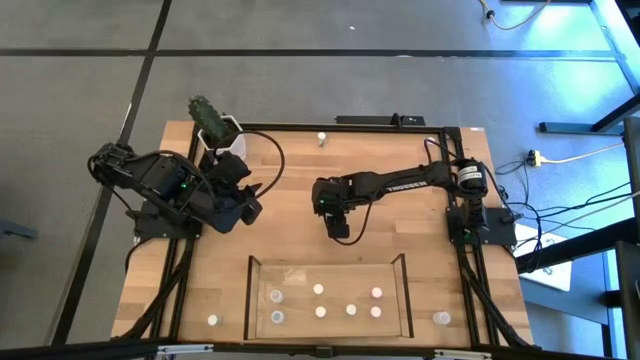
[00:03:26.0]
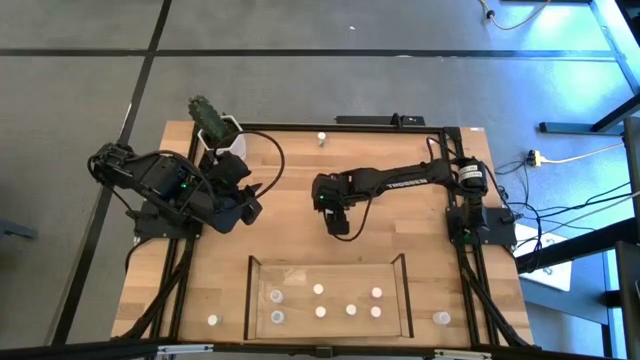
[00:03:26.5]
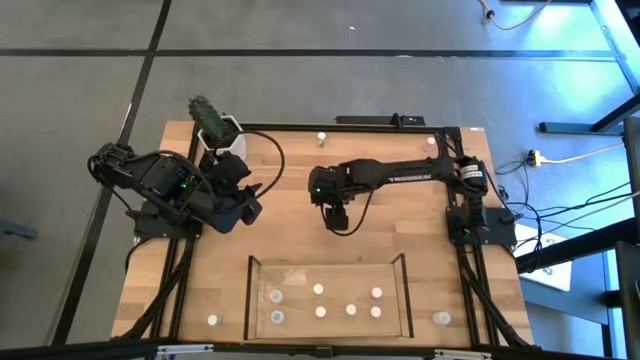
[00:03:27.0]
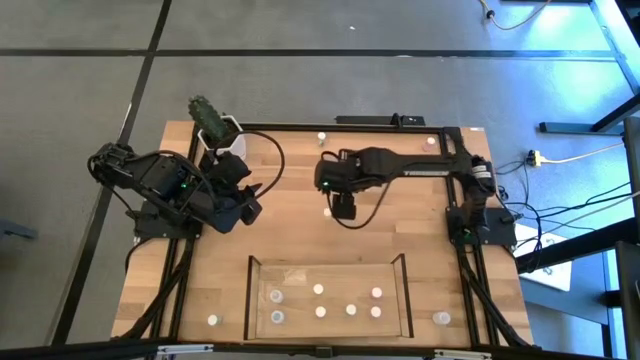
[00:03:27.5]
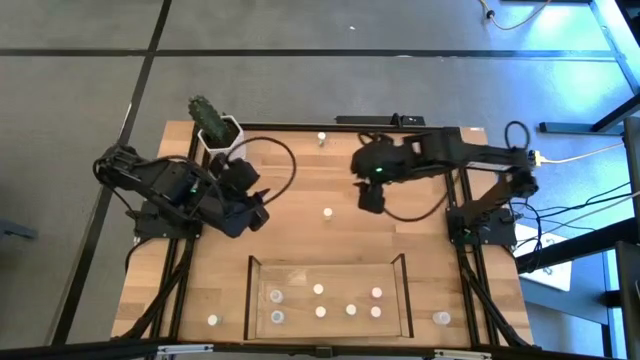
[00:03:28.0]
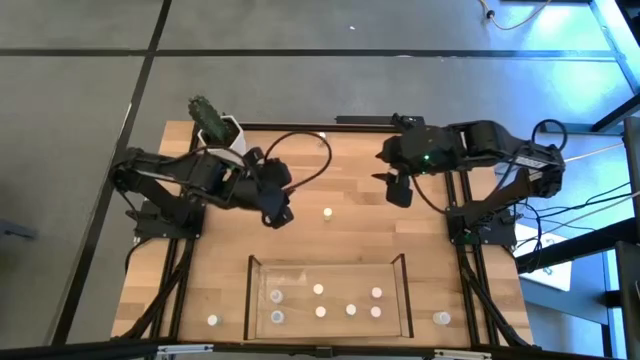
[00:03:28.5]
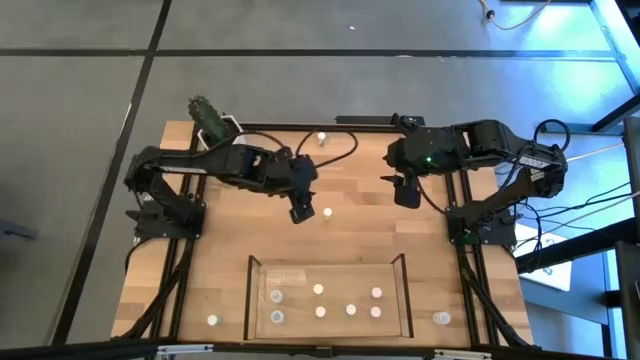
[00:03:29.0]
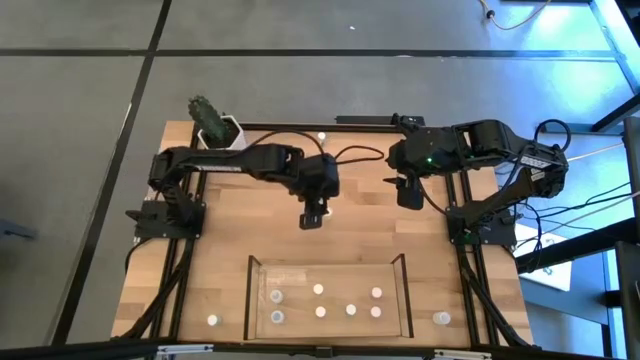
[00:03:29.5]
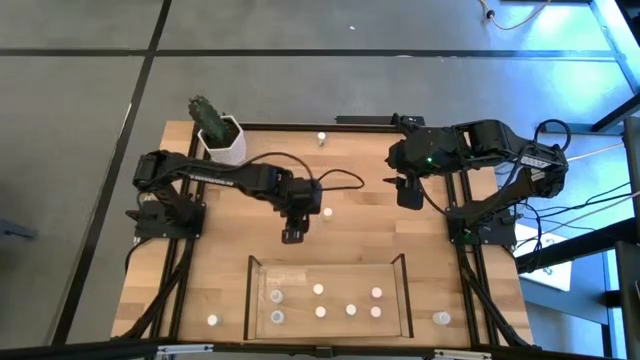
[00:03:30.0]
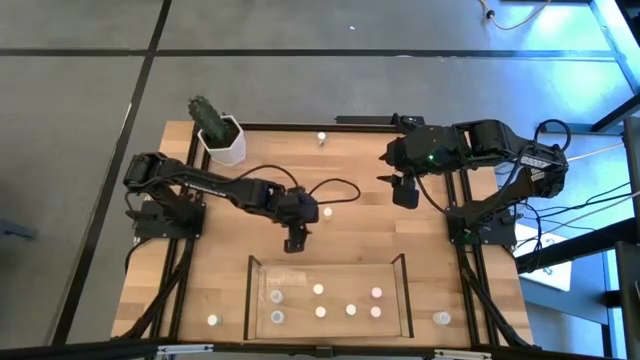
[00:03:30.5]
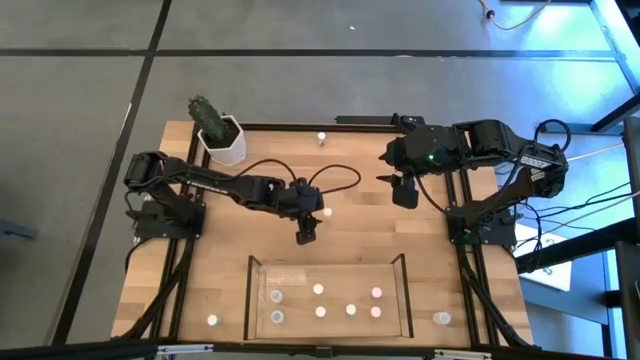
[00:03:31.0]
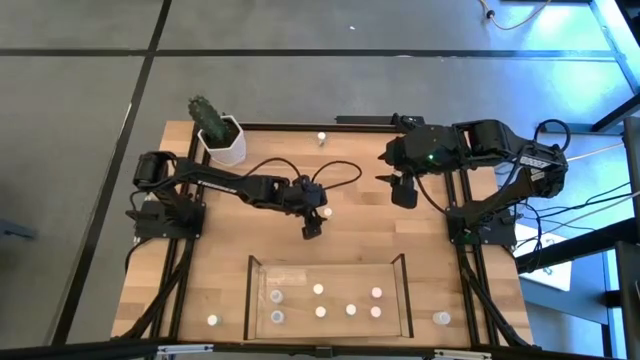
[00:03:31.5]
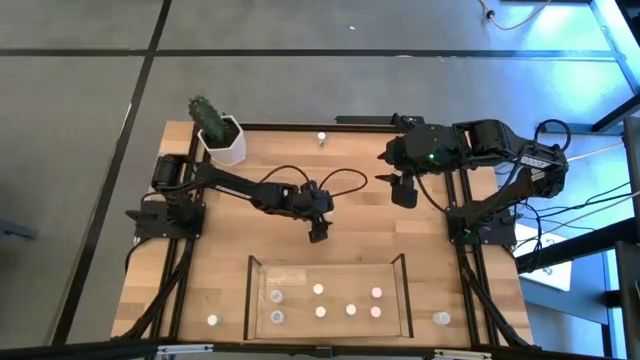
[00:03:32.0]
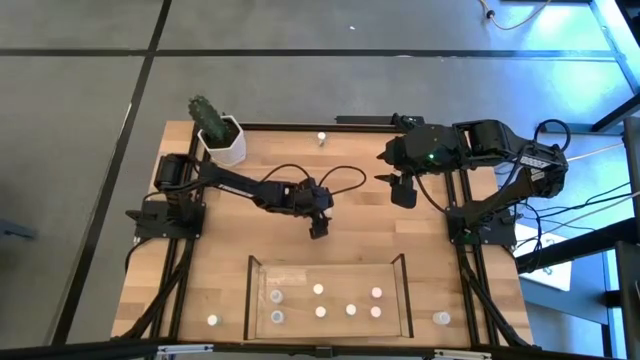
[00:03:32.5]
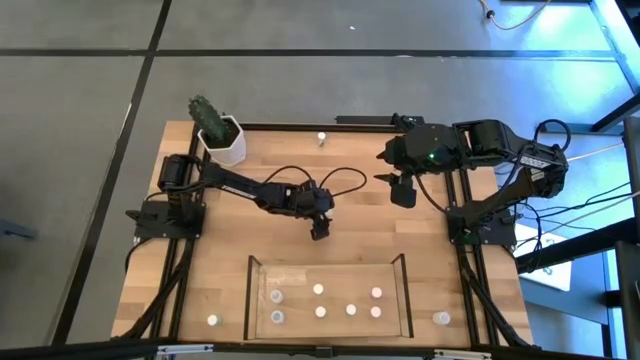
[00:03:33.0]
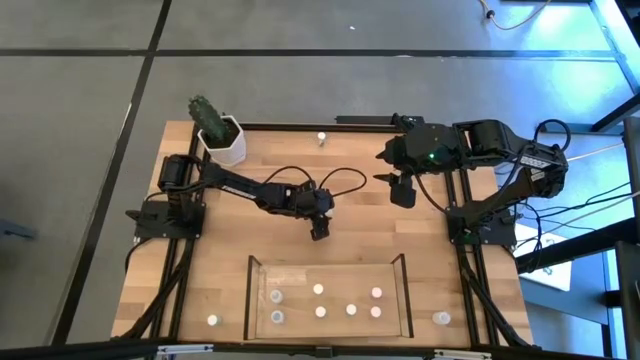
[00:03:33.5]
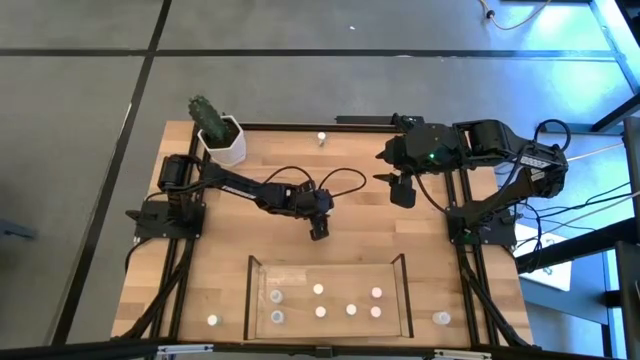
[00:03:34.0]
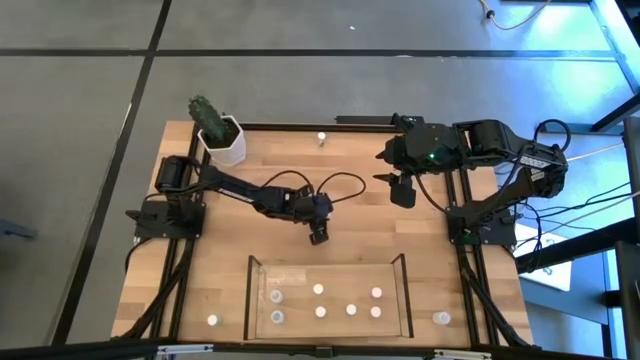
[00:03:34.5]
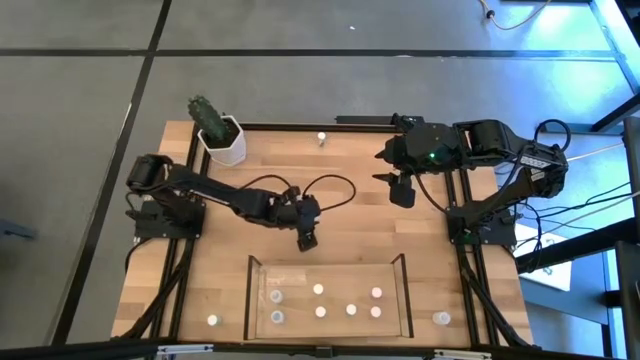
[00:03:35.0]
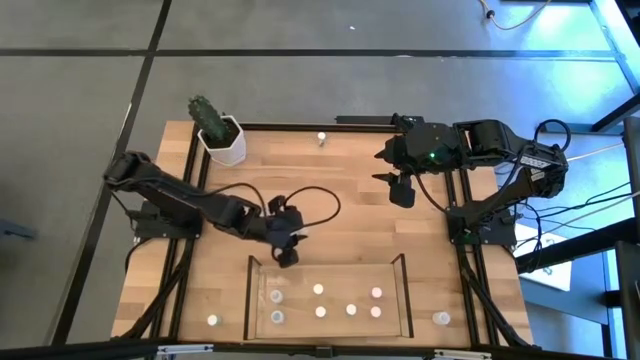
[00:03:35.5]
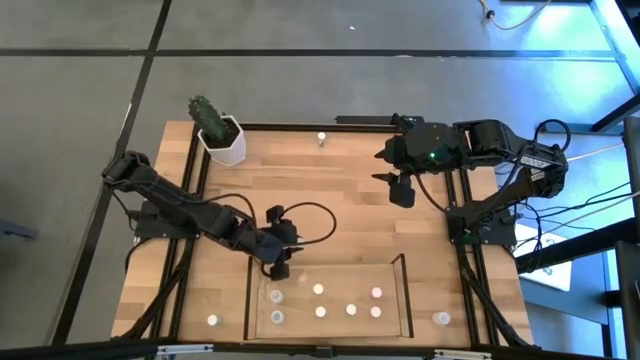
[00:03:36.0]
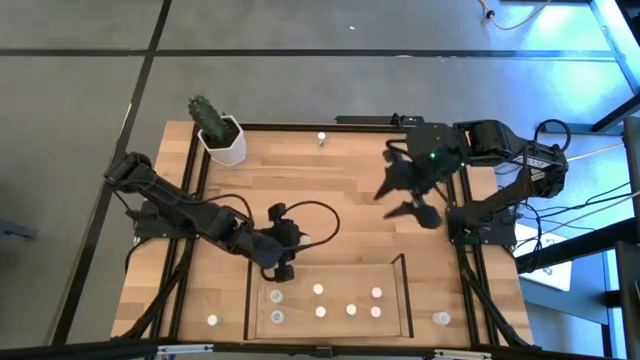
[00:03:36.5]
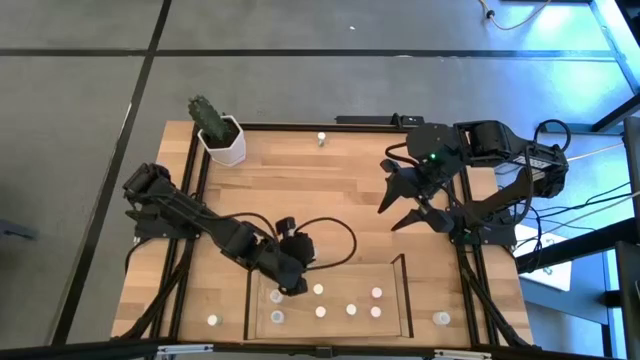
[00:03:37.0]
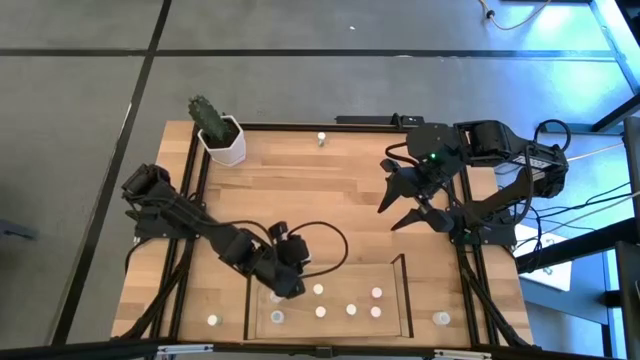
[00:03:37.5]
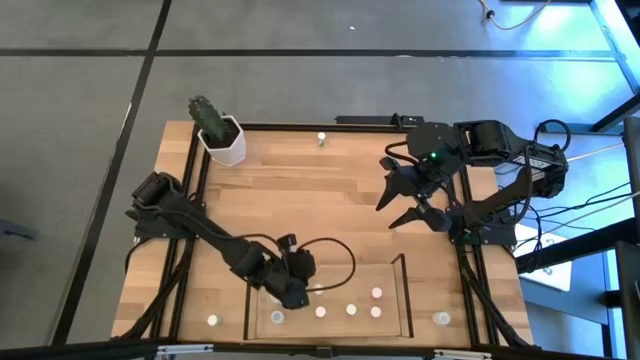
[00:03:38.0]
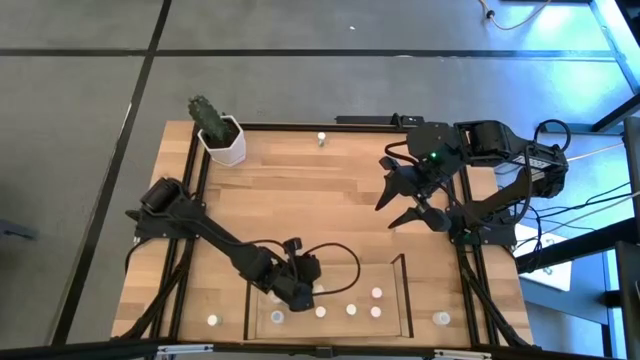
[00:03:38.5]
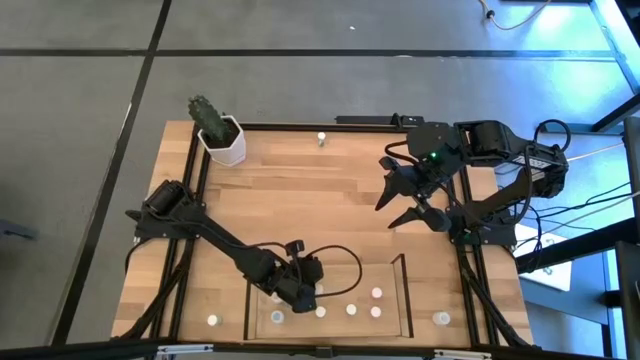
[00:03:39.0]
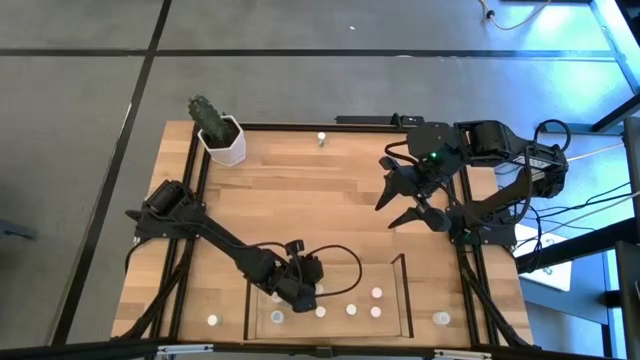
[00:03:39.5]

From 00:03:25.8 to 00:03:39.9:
Task: Pick and place medicine bottles onto shelf by color
Put the yellow pill bottle on the shelf aligned with the other yellow pill bottle

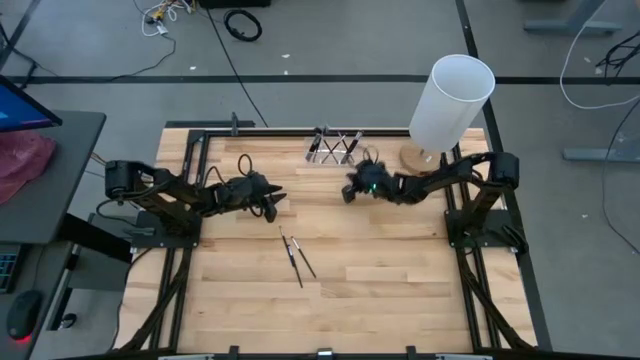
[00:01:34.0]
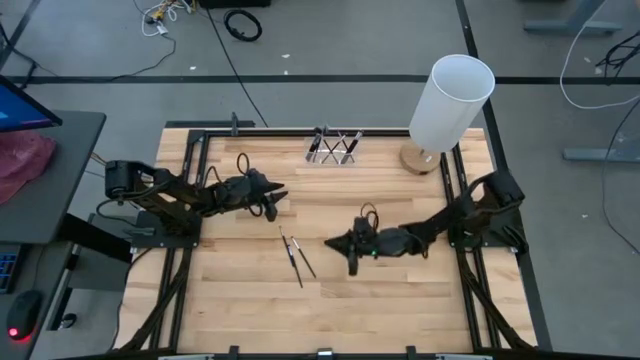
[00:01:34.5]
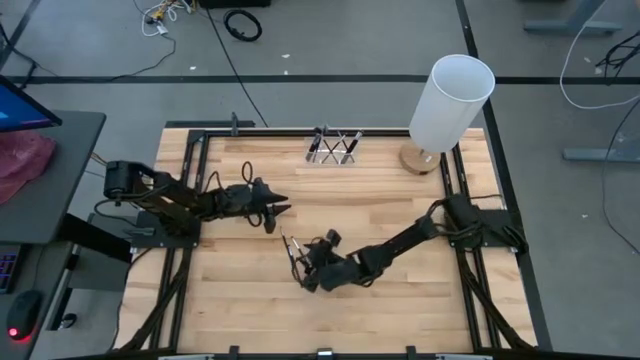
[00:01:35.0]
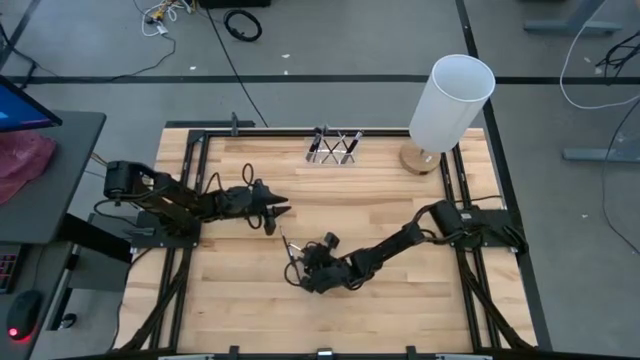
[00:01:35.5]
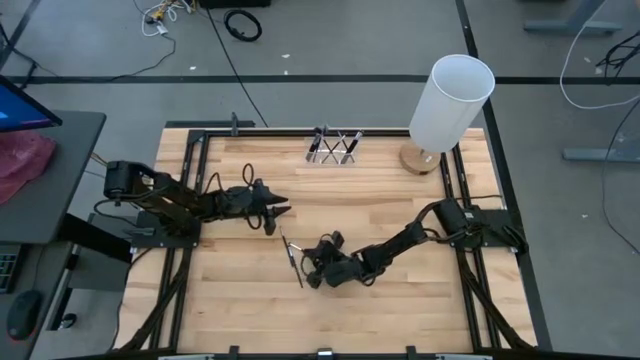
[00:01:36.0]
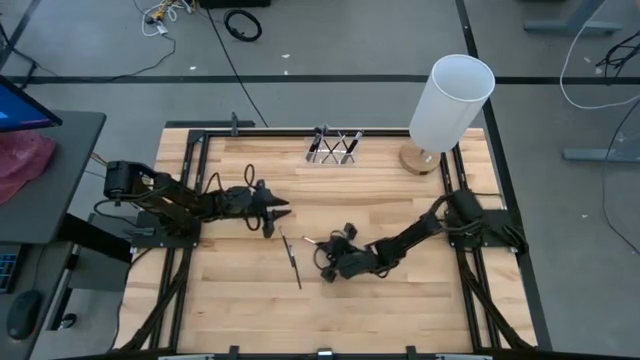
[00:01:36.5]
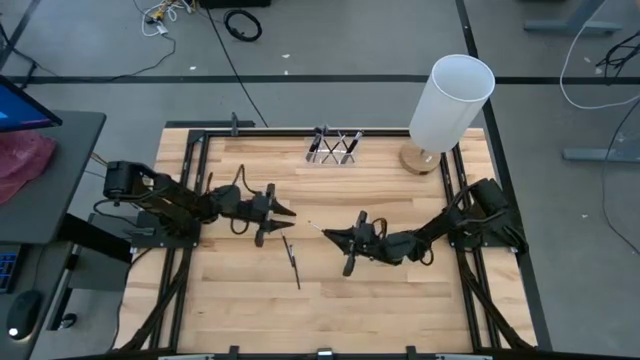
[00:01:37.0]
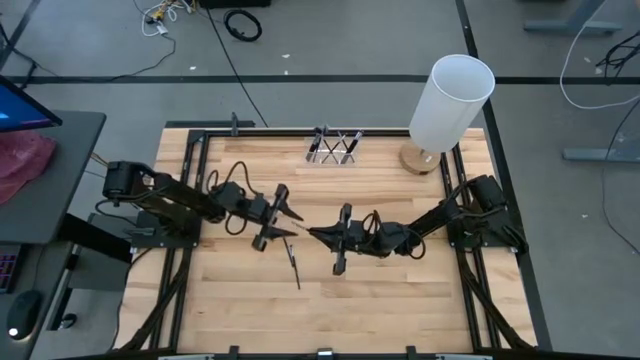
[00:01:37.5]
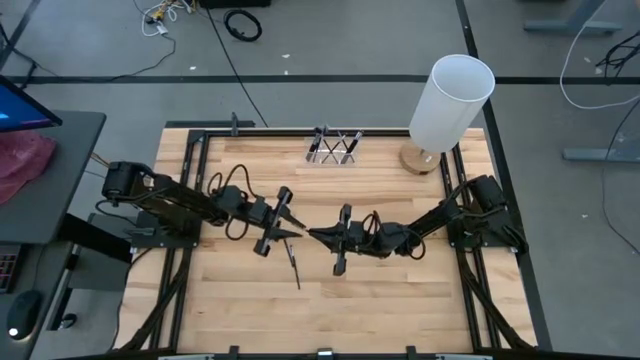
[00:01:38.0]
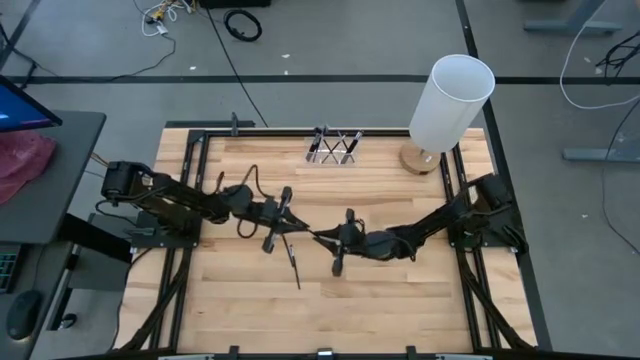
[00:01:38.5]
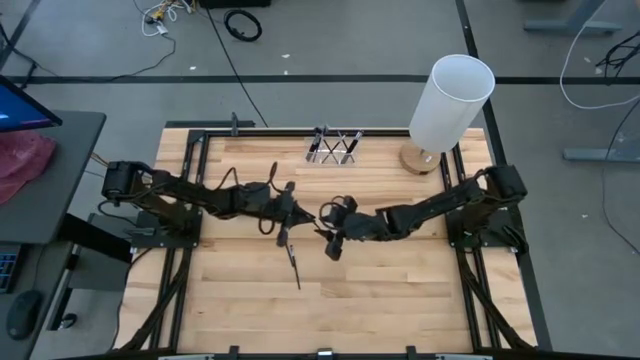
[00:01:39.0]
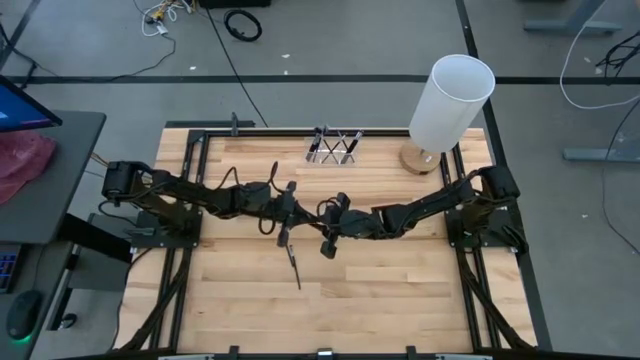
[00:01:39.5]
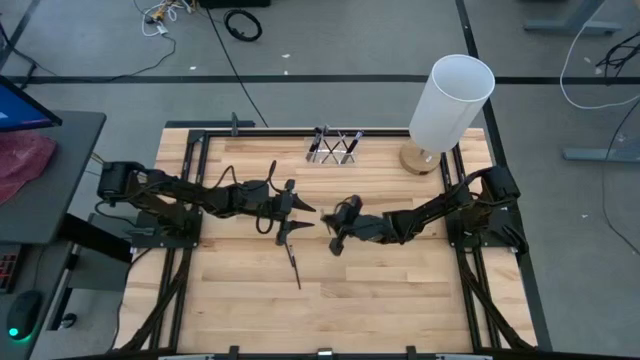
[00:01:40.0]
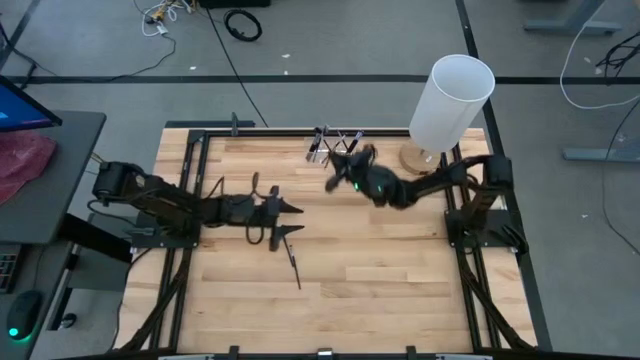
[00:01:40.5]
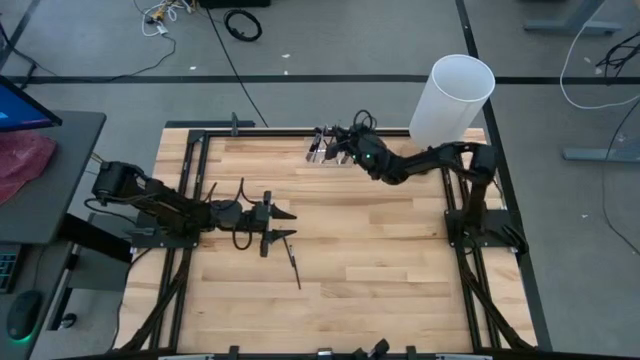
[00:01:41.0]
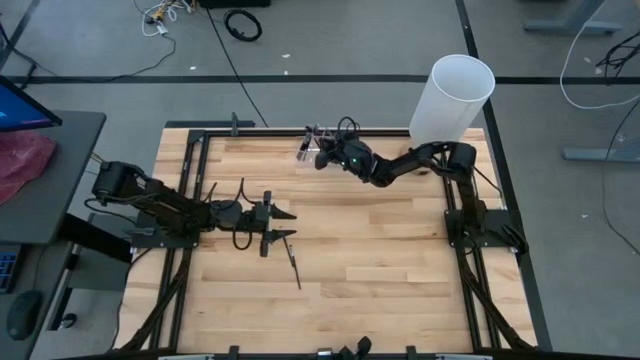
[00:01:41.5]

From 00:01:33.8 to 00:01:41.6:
Task: Pick & Place Makeup Supplies
Put the black makeup brush into the transparent organizer
